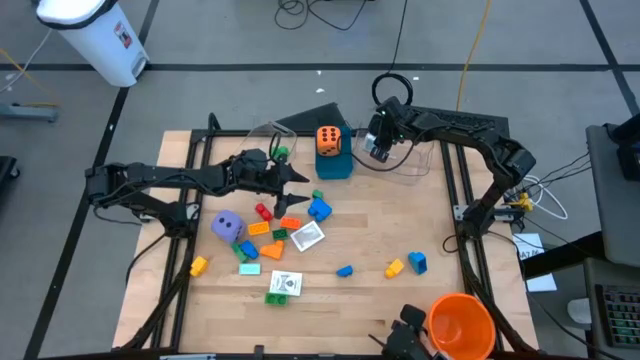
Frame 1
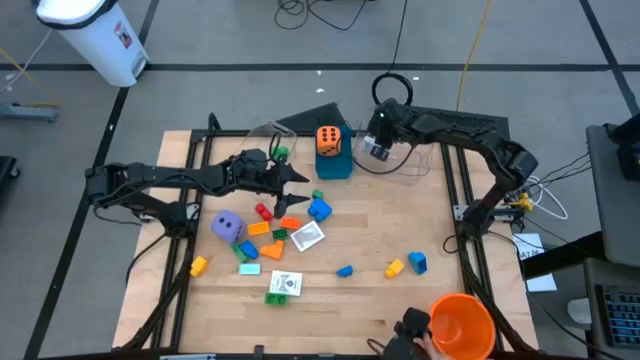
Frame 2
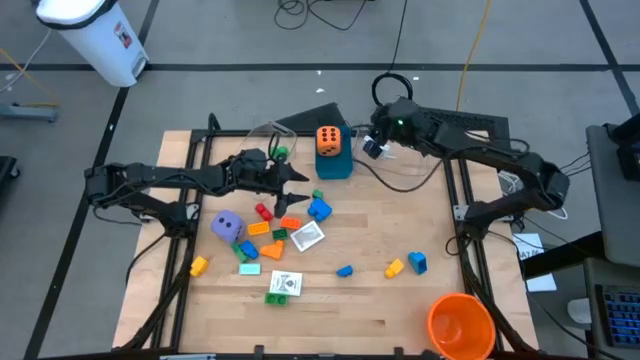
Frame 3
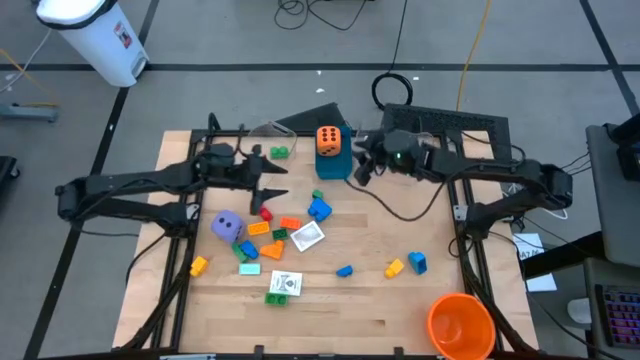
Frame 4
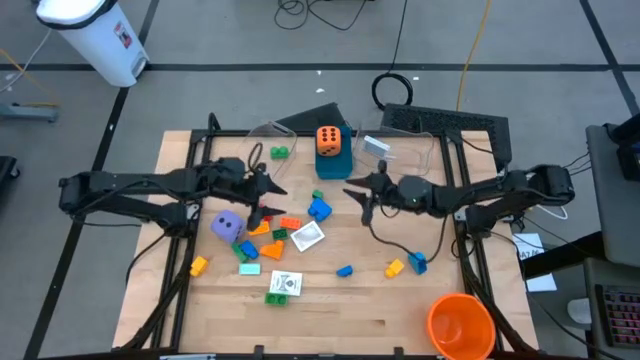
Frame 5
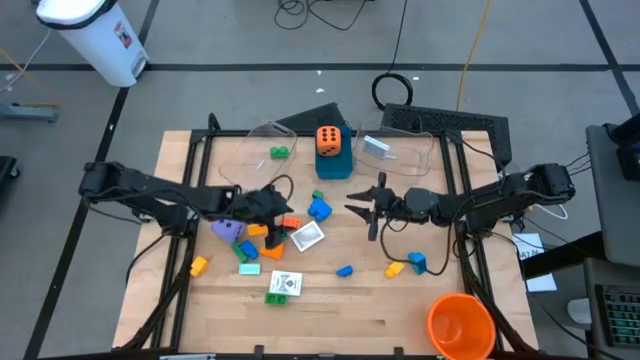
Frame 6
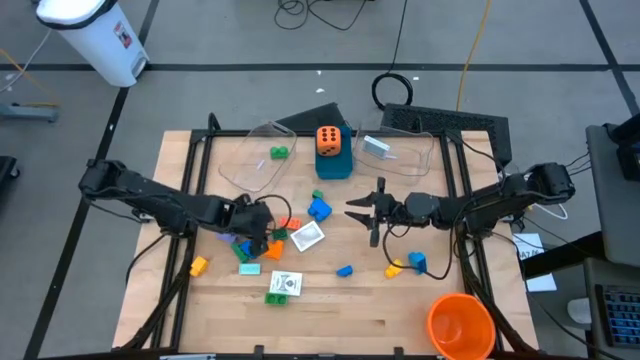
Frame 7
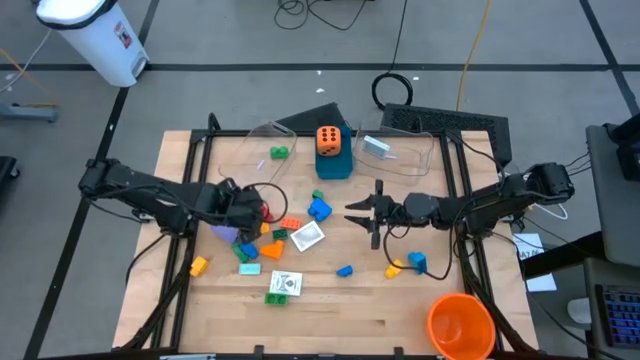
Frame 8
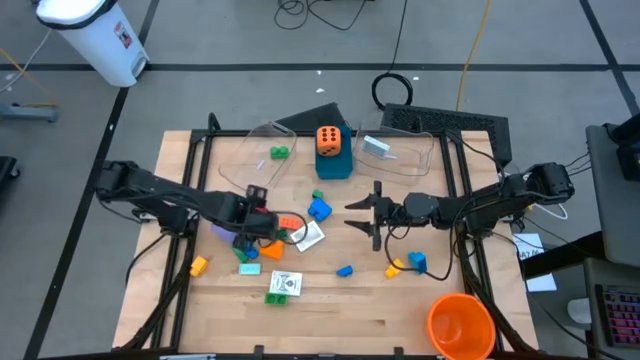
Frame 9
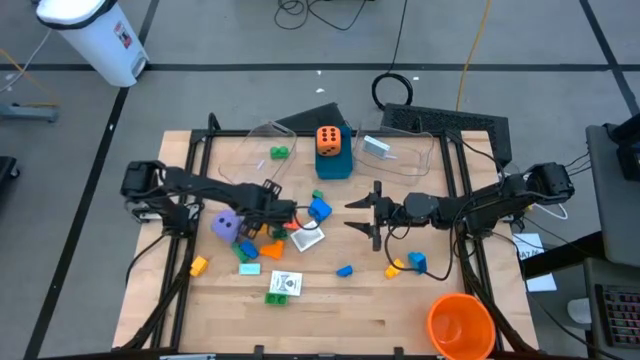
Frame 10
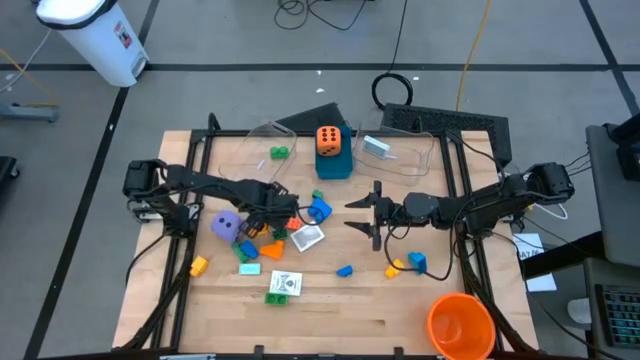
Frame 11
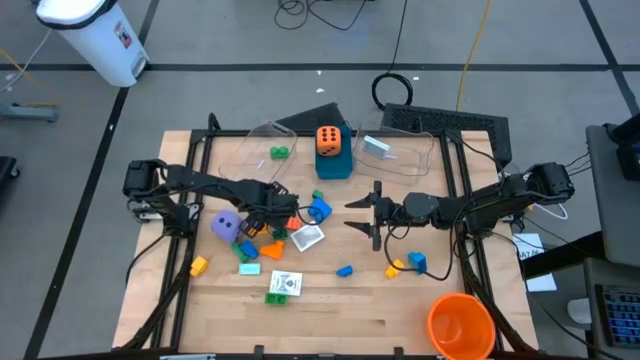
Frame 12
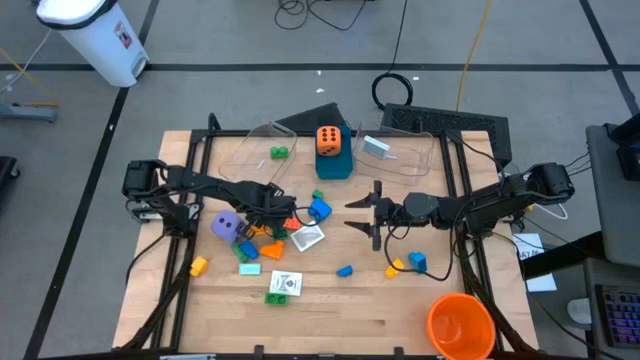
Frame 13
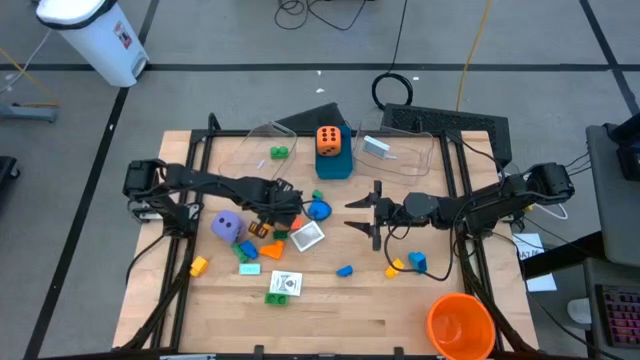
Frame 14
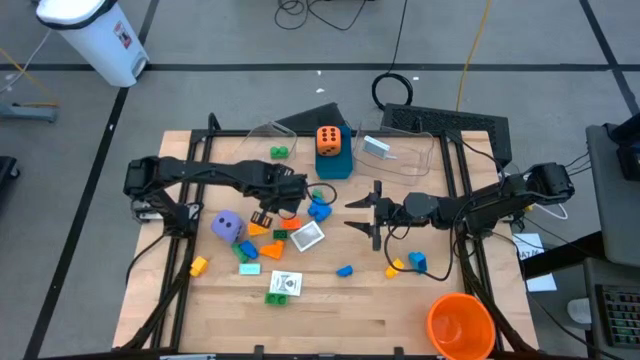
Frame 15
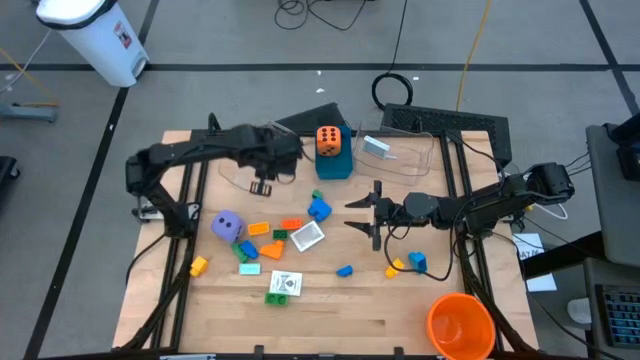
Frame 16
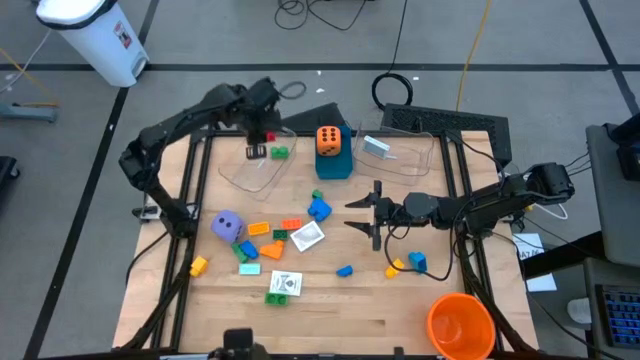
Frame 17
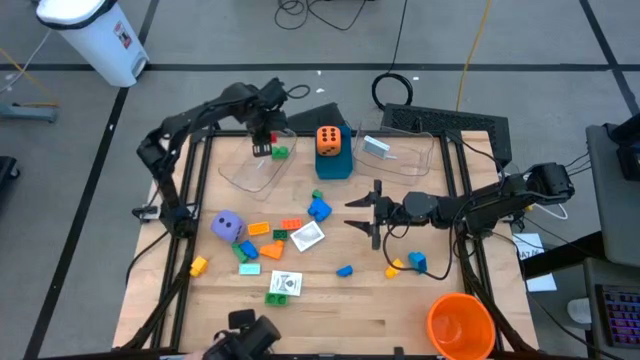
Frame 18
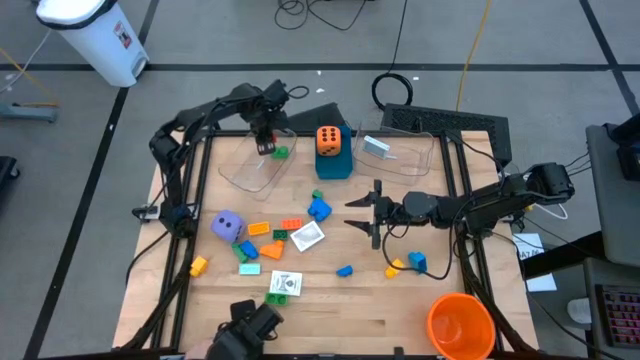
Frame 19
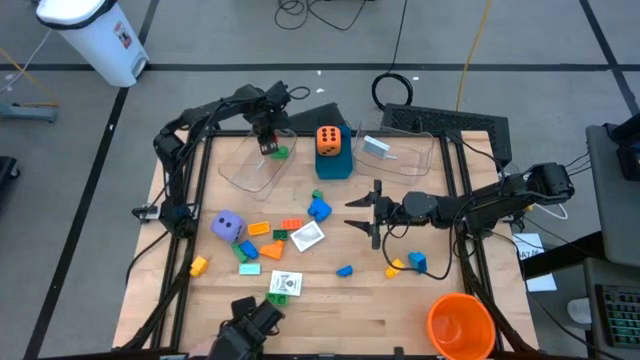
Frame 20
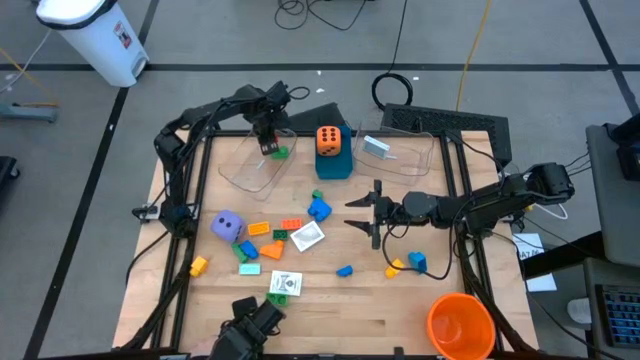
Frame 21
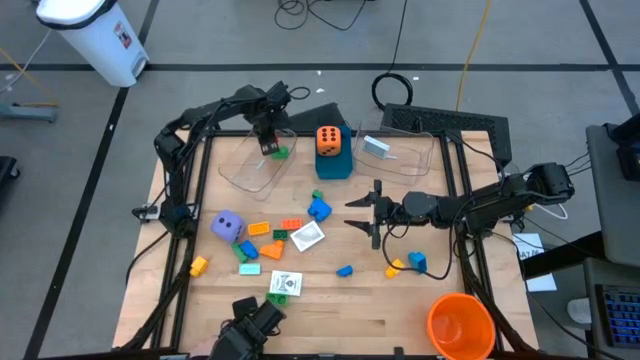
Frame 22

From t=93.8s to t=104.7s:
Task: Pick & Place Toys
Put the red game piece into the left transparent bin

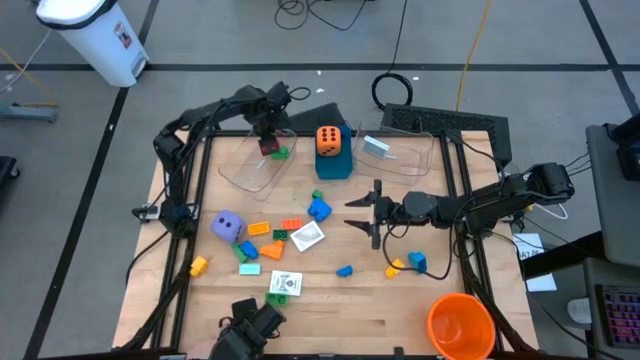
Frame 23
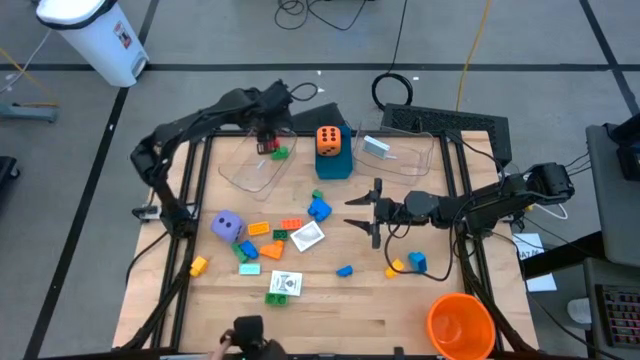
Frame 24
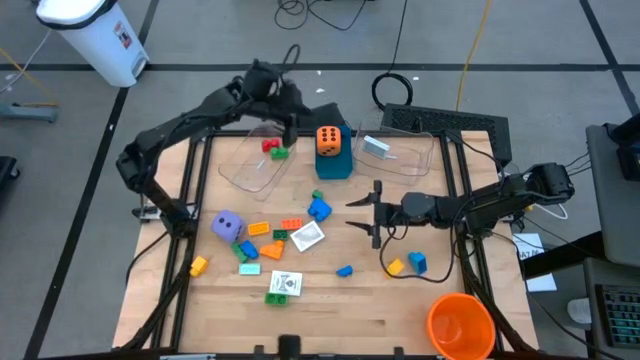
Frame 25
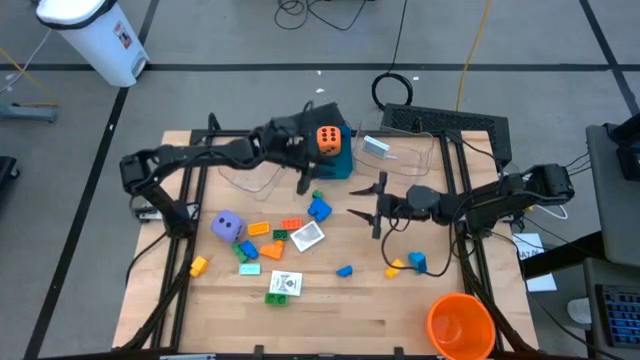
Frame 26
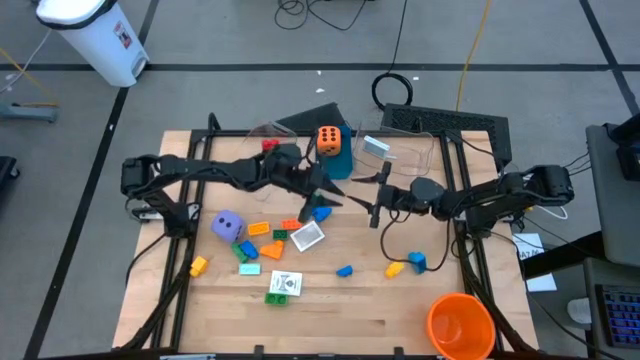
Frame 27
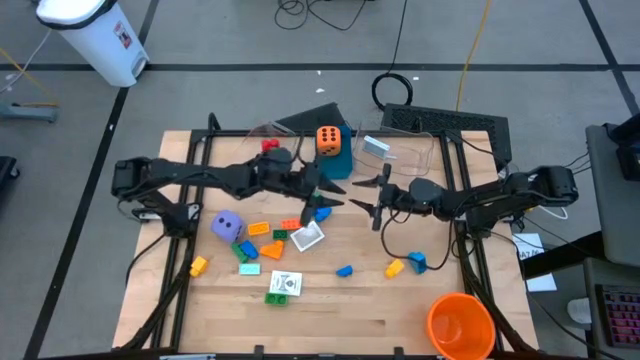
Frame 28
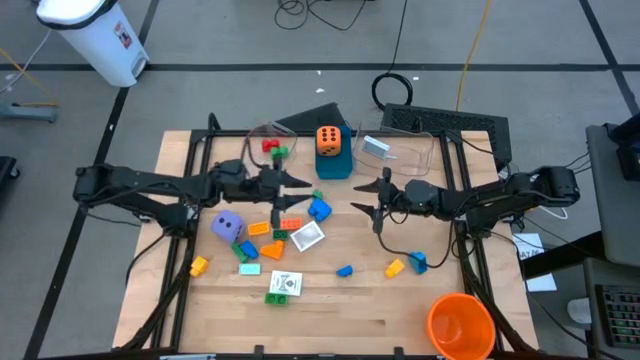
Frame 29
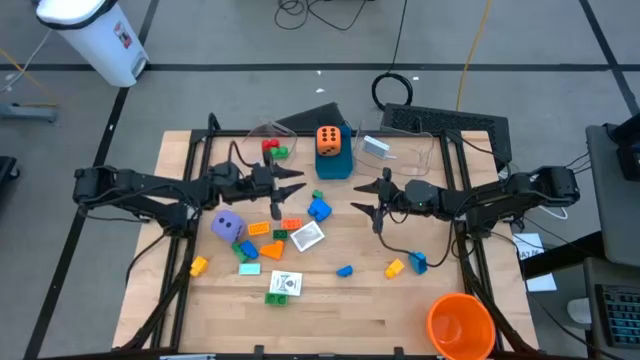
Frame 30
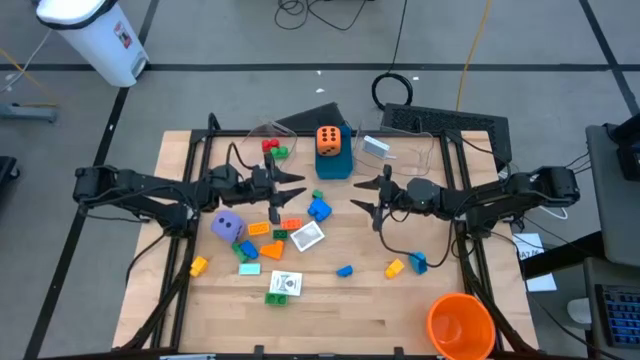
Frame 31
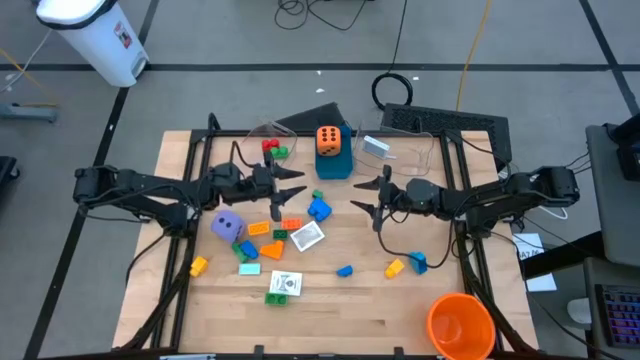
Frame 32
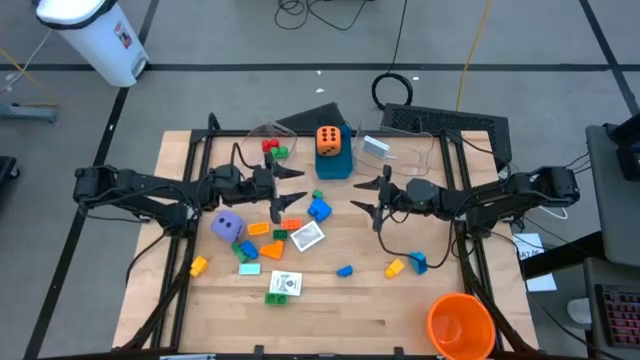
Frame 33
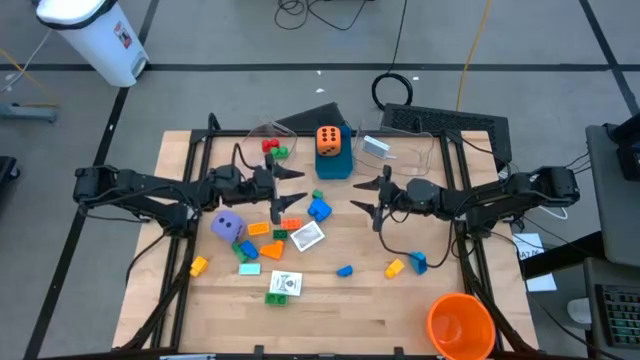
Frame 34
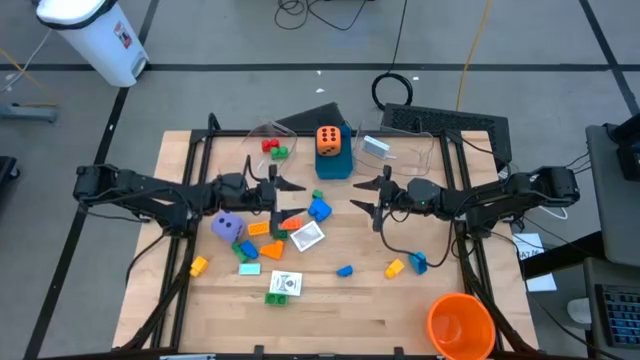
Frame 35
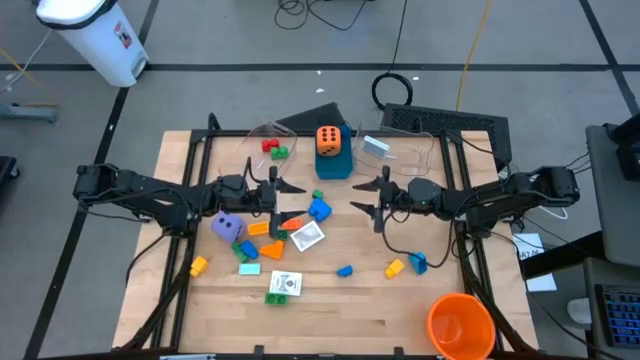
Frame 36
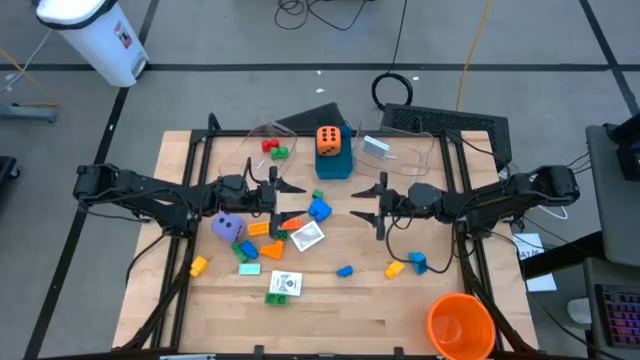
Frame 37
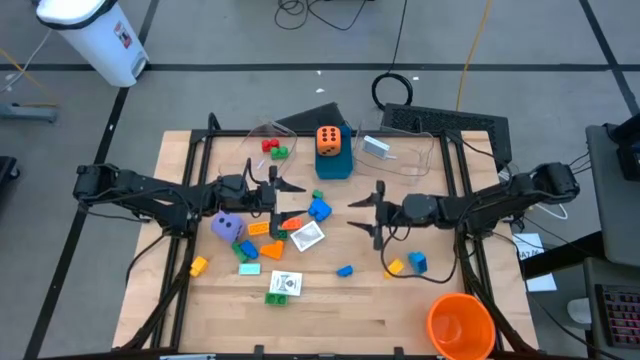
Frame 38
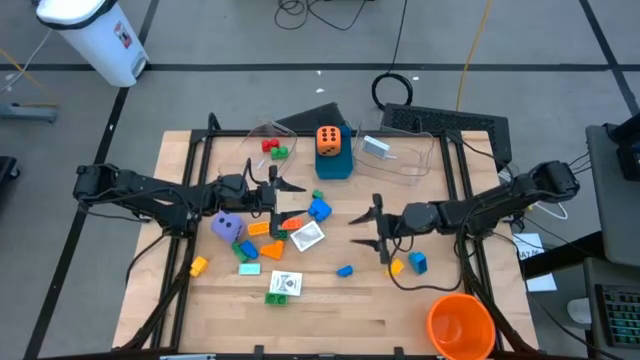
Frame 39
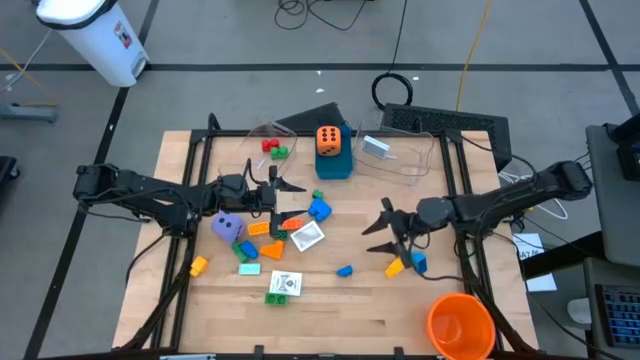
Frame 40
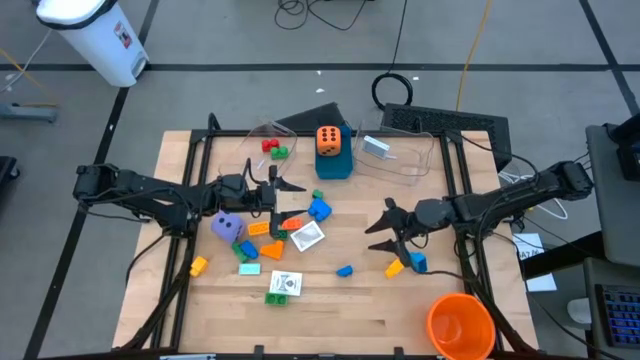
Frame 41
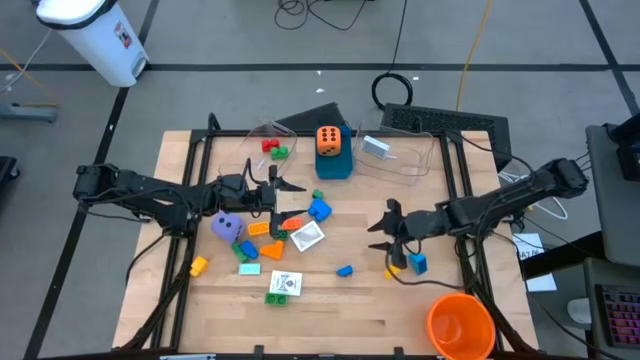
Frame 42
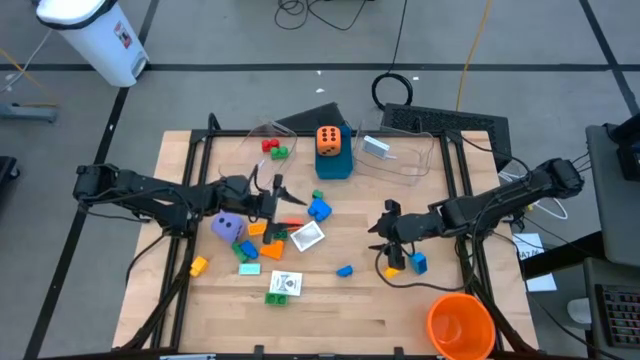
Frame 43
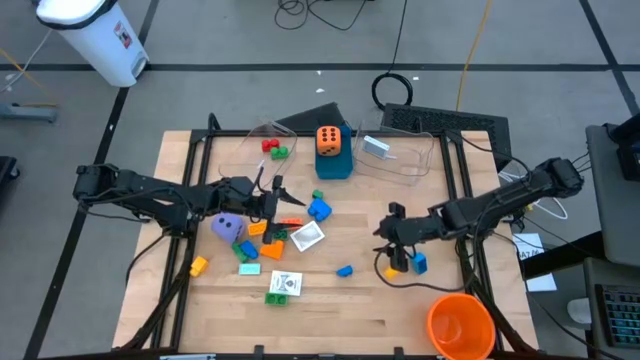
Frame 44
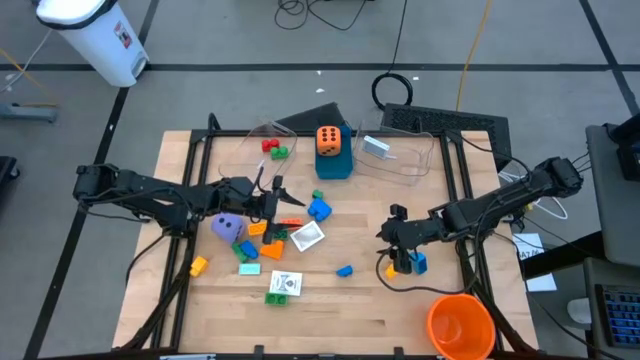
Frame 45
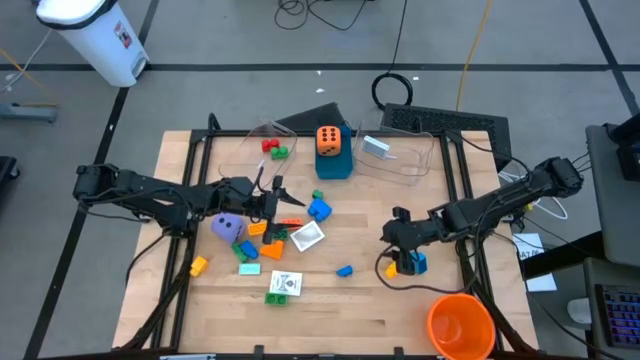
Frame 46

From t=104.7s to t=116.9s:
Put the blue game piece into the left transparent bin
